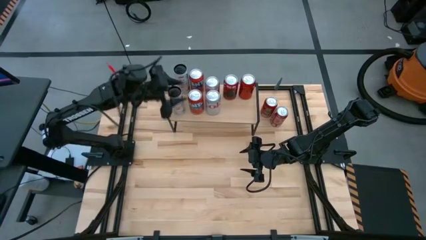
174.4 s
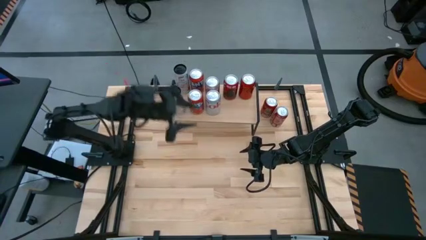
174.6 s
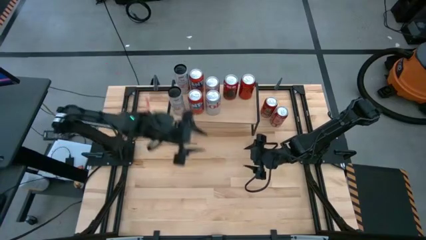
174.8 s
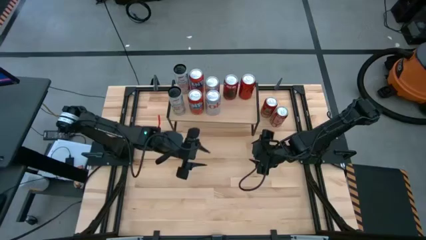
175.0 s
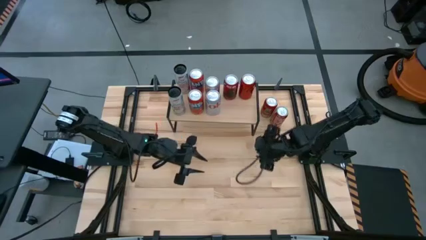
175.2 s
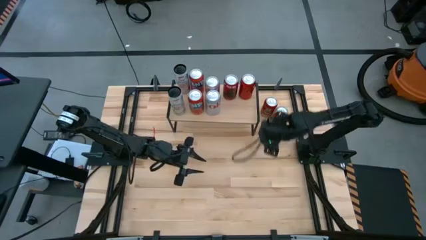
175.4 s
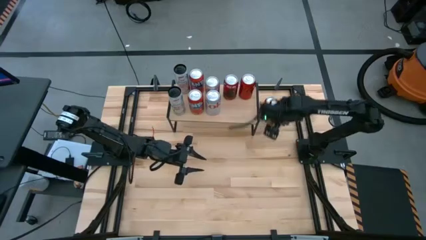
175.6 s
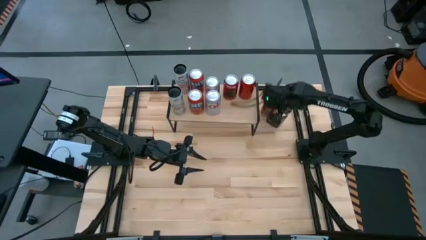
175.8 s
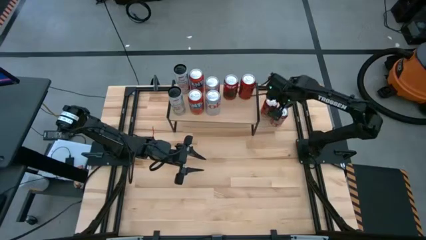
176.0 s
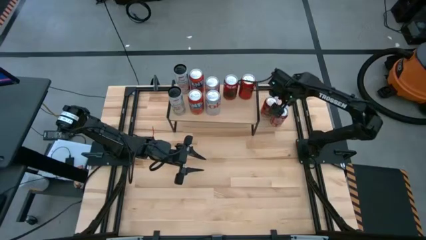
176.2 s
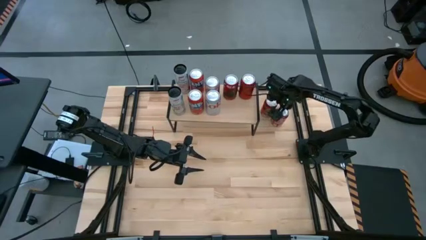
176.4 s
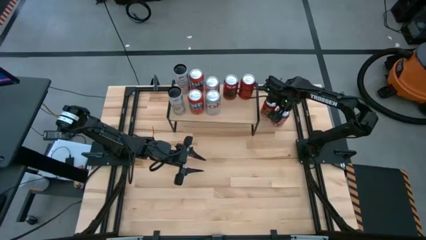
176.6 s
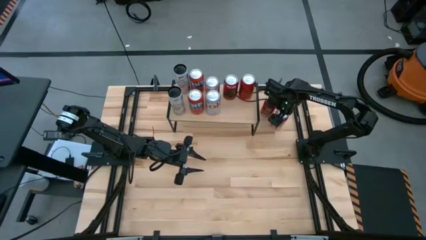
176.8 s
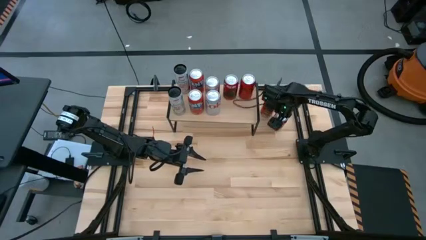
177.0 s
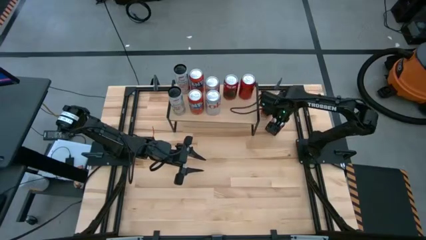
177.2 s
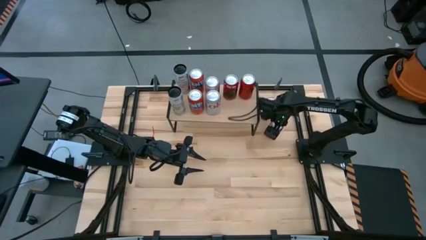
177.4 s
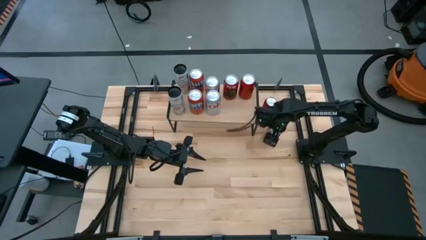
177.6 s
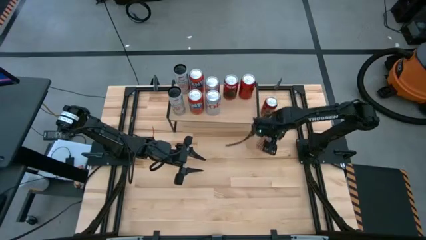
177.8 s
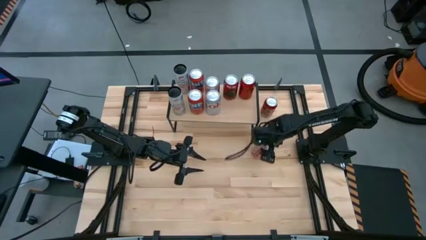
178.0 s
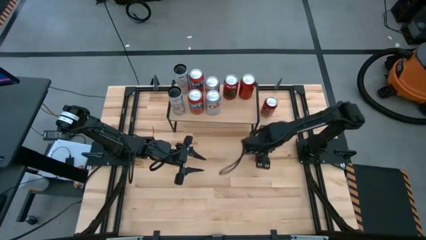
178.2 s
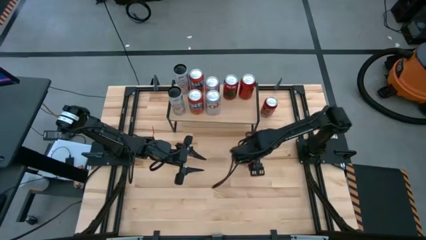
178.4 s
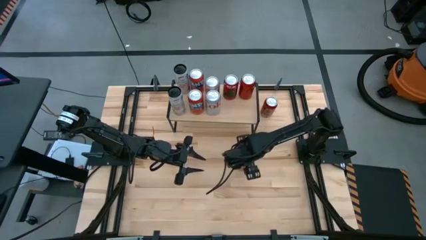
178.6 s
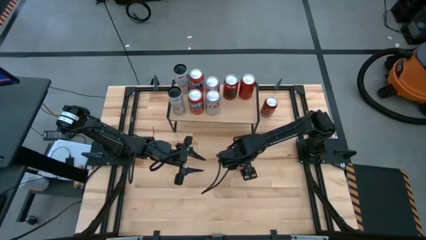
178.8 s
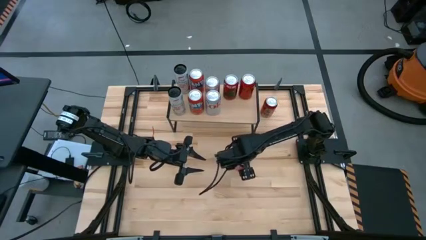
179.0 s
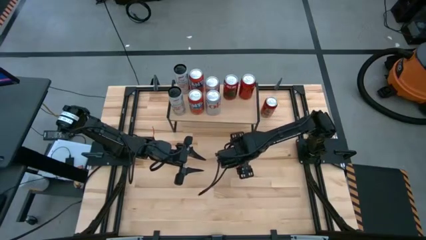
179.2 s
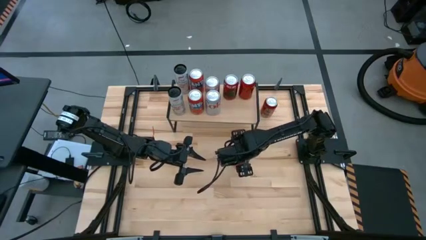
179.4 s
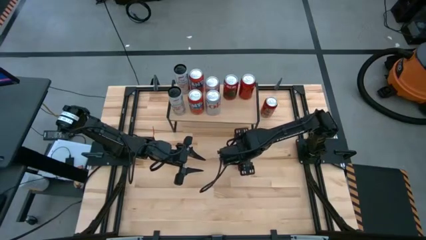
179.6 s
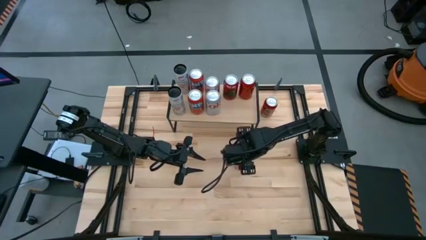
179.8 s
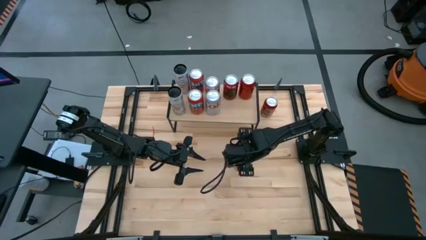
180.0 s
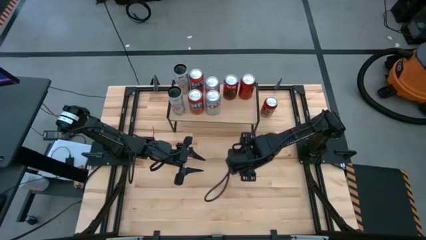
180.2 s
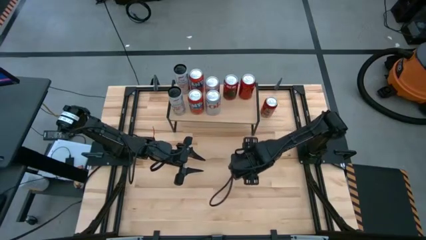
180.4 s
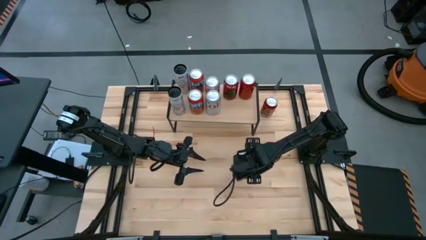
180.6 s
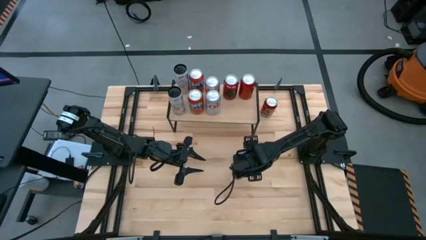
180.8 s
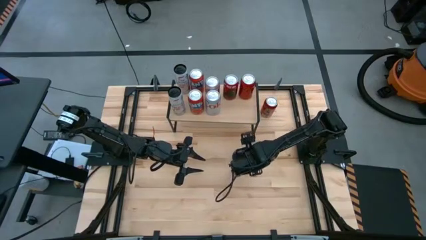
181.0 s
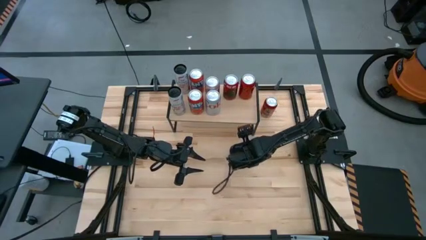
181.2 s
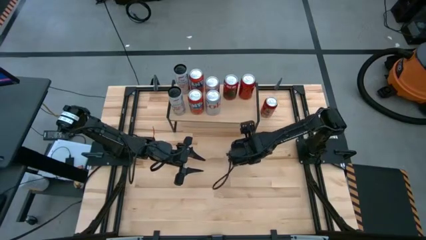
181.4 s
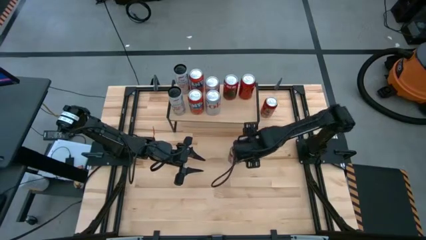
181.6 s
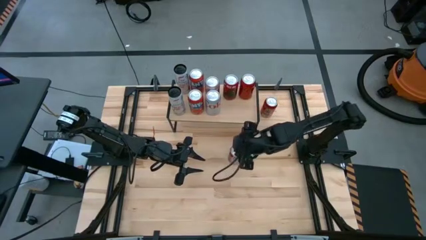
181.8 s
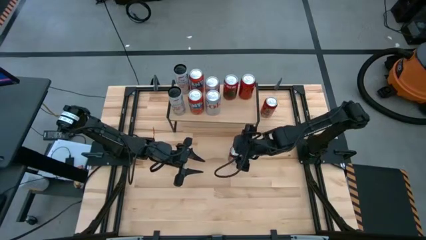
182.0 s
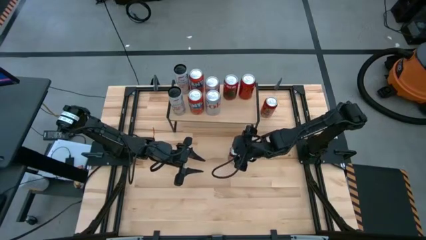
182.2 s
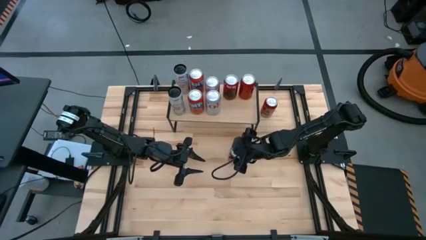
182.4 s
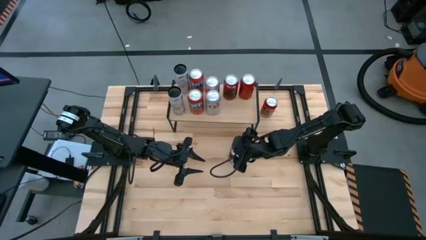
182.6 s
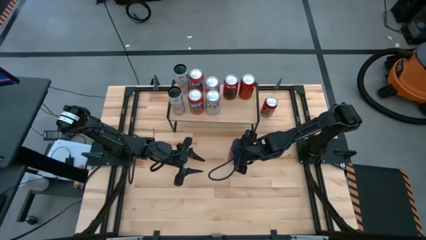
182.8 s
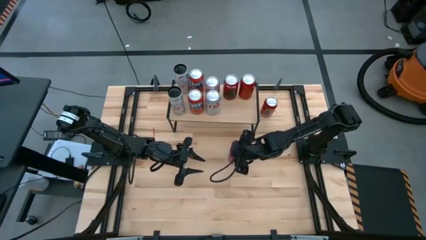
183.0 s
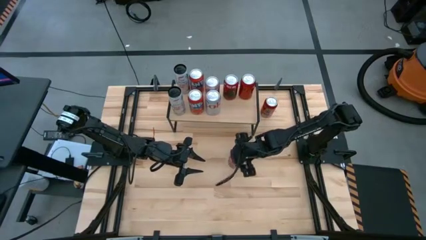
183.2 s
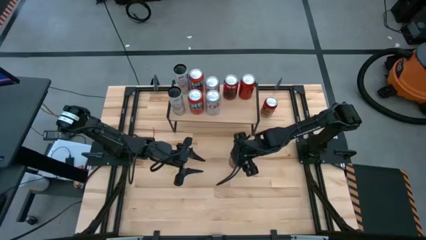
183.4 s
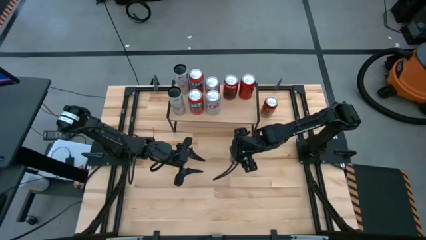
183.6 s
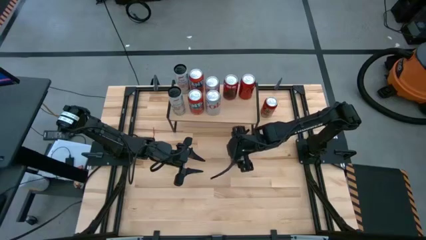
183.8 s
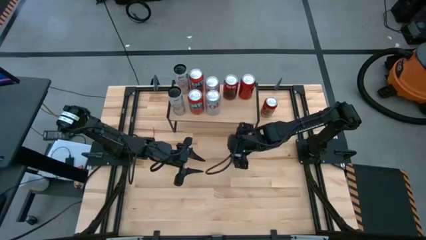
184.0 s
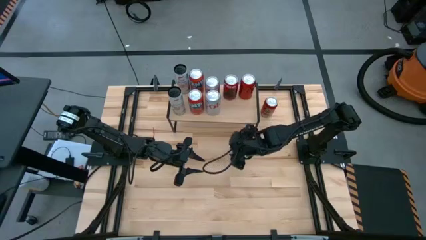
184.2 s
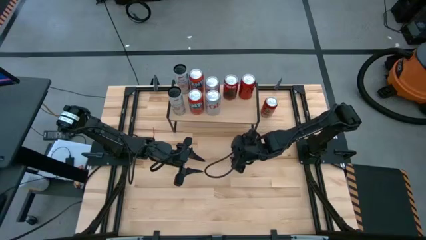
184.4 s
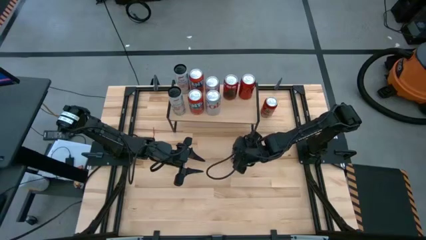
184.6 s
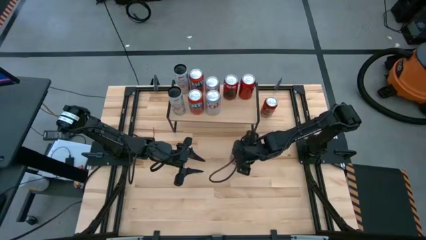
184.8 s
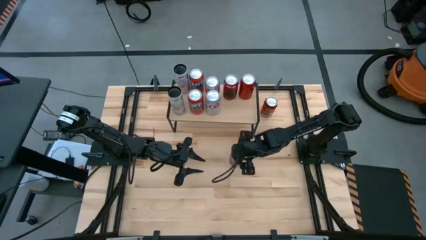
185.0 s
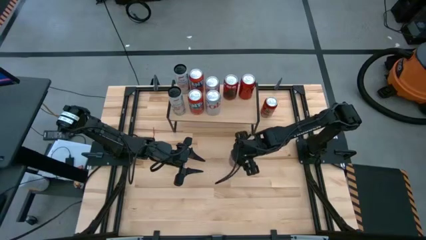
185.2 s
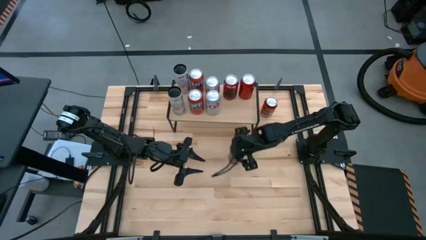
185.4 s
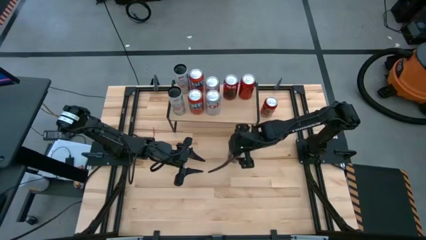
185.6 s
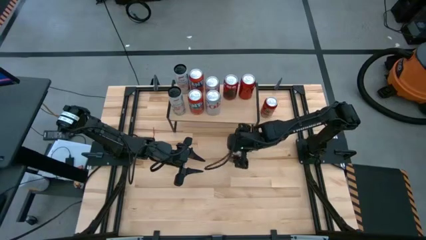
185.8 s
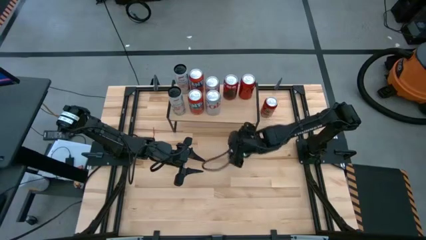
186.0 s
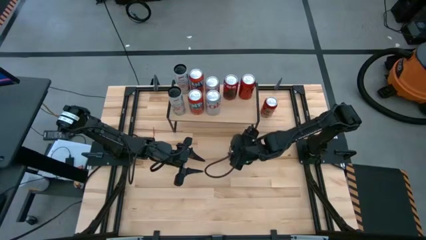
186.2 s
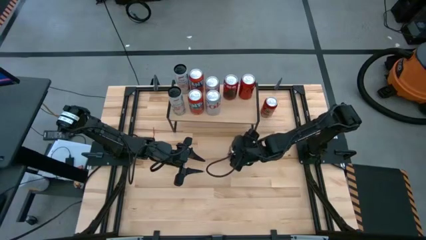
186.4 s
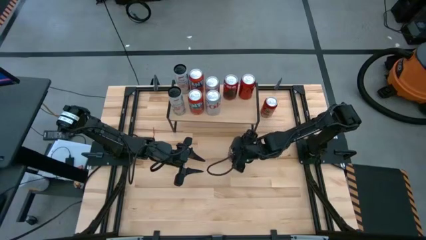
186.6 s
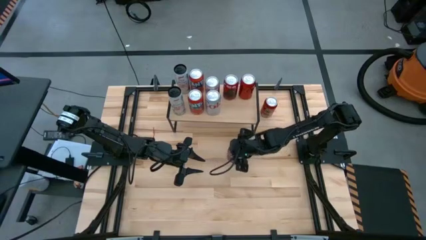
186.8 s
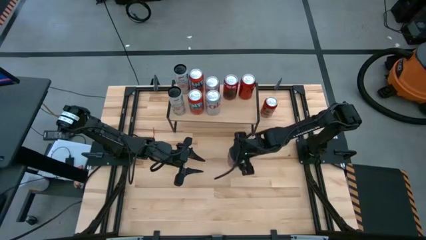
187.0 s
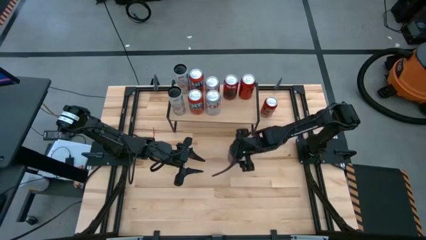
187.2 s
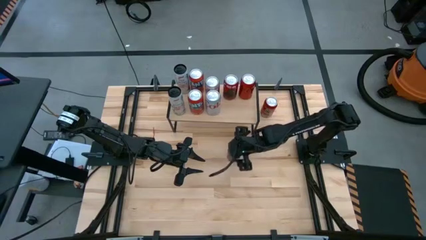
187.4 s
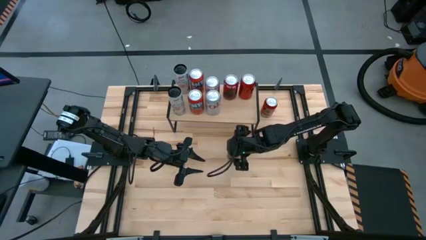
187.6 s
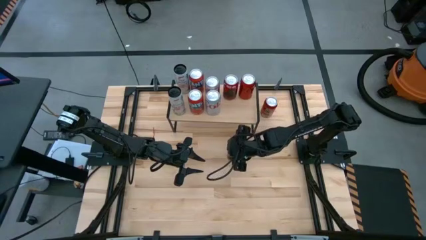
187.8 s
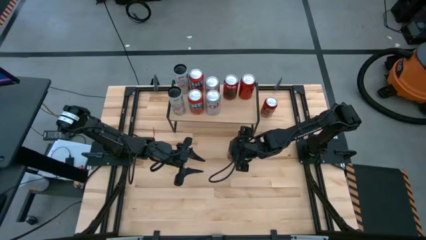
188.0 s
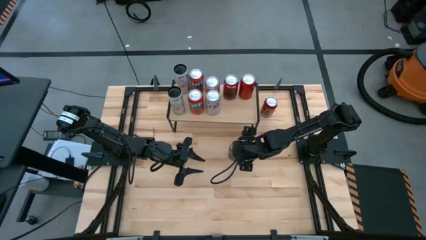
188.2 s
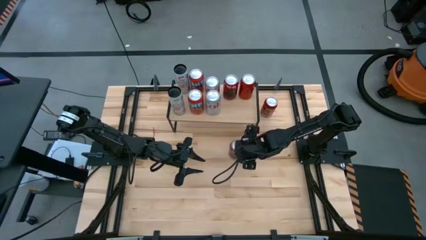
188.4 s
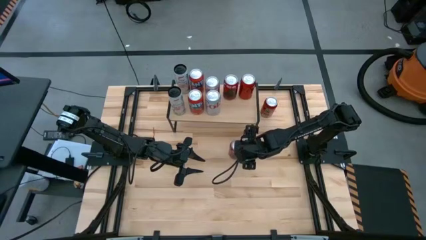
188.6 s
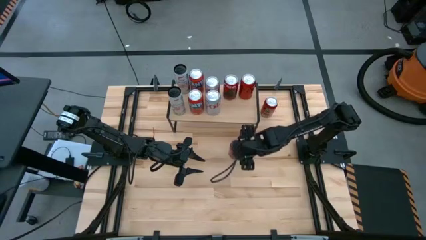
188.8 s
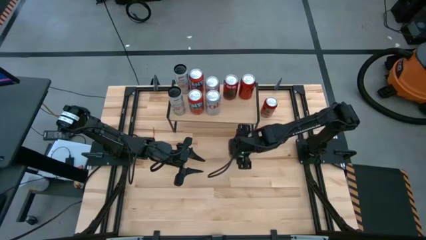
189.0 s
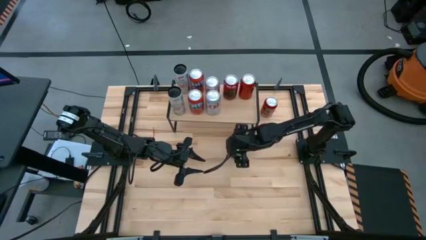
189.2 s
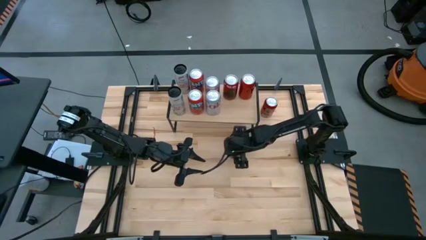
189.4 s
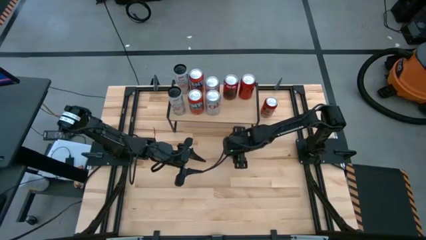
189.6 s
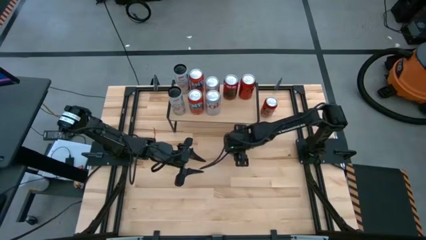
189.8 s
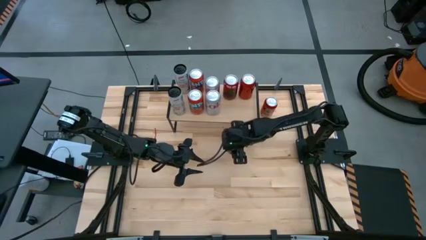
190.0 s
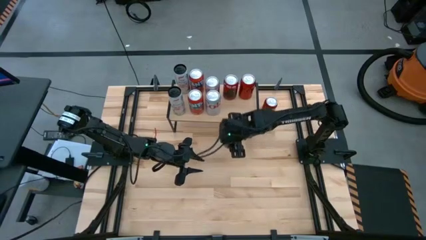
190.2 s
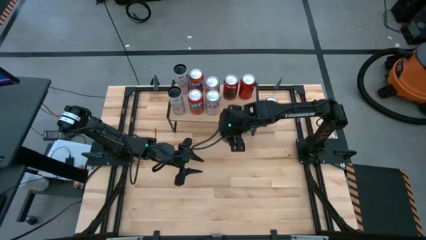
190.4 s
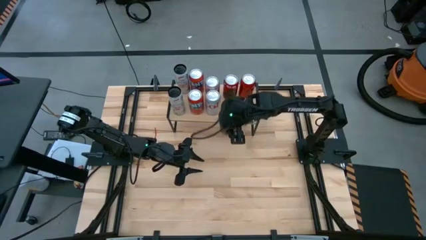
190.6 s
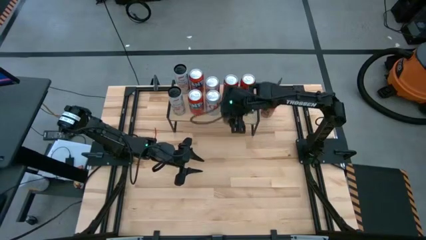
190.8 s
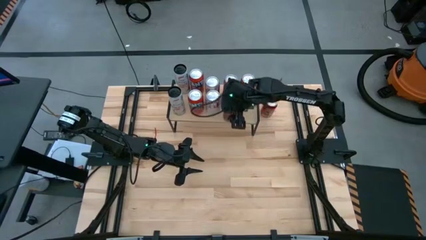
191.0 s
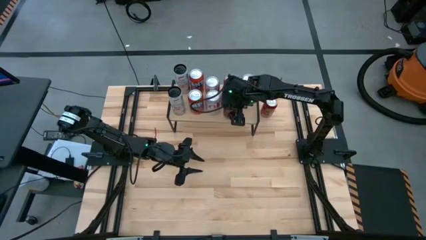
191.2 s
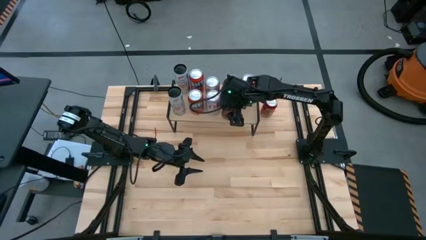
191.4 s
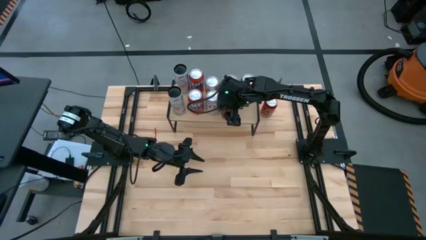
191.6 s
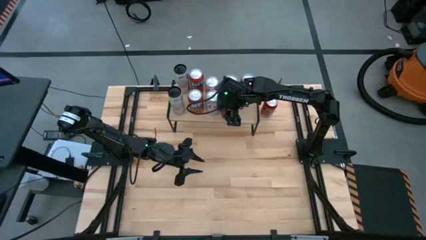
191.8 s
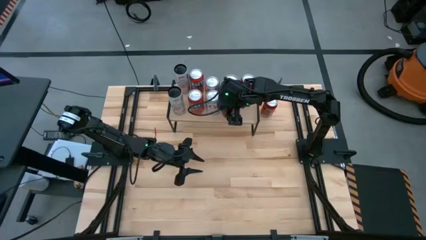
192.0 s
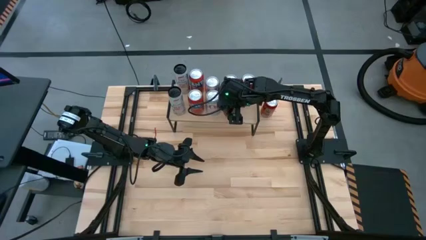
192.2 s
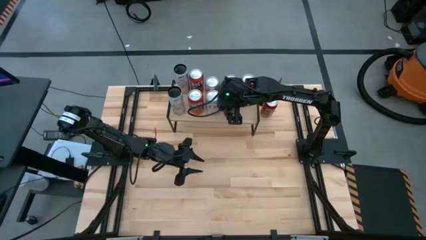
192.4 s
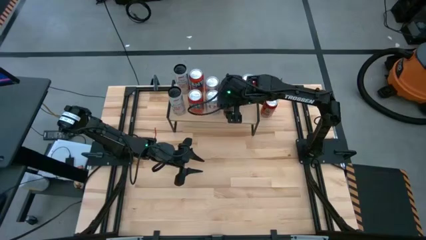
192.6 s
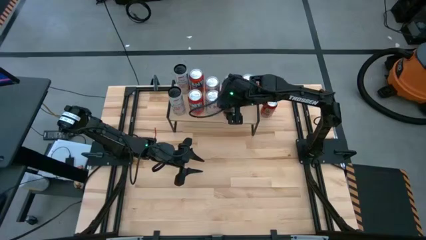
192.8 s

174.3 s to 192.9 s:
Task: Place canned beverage on shelf
Put the red and white soda can on the shelf aligned with the other red and white soda can
